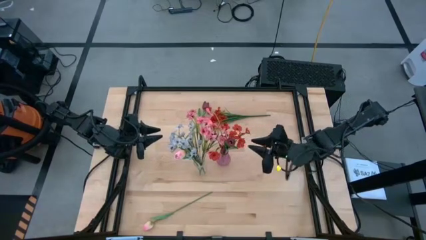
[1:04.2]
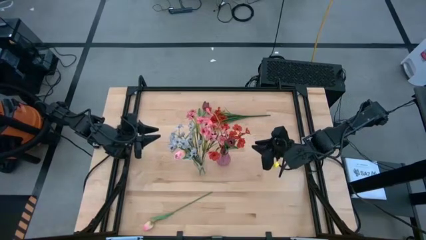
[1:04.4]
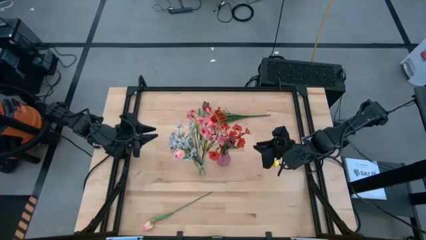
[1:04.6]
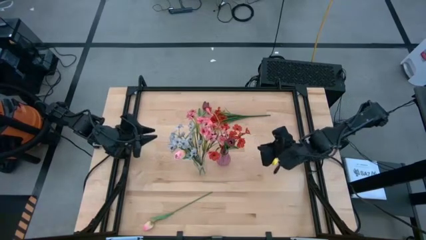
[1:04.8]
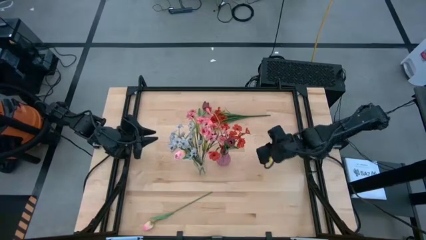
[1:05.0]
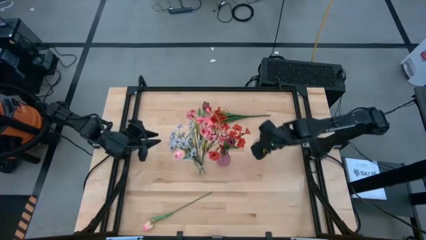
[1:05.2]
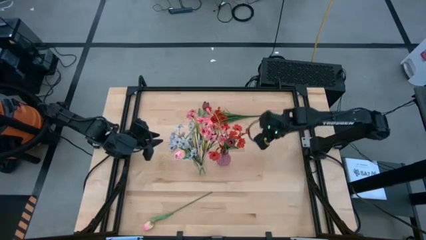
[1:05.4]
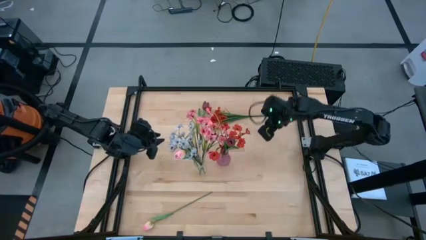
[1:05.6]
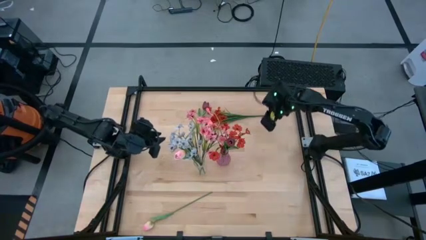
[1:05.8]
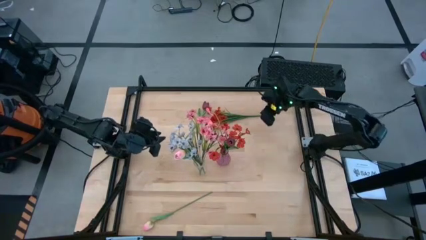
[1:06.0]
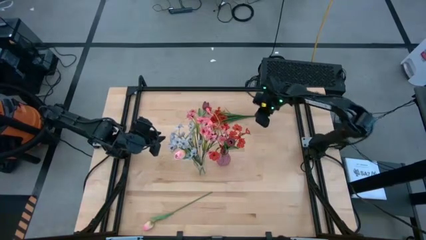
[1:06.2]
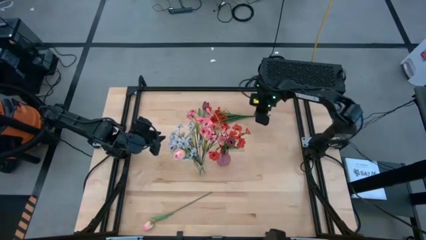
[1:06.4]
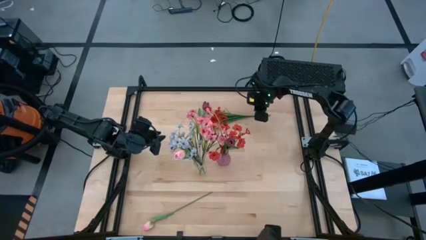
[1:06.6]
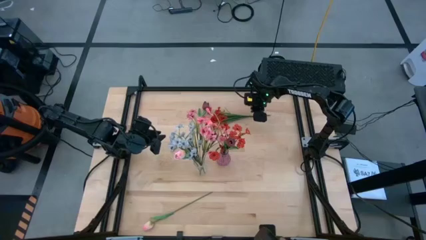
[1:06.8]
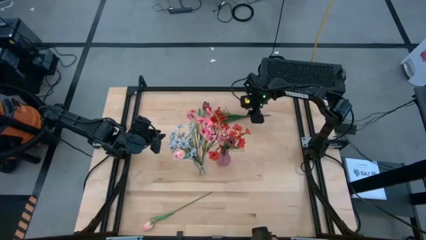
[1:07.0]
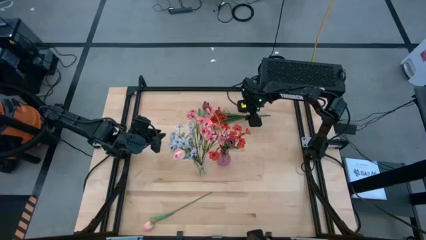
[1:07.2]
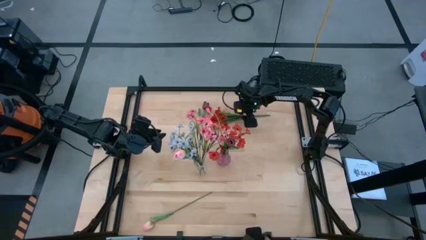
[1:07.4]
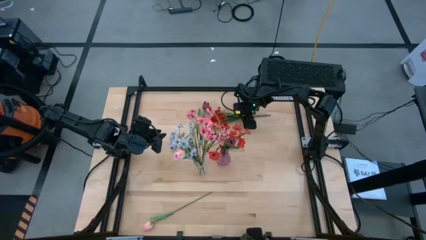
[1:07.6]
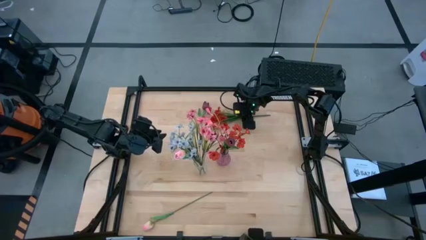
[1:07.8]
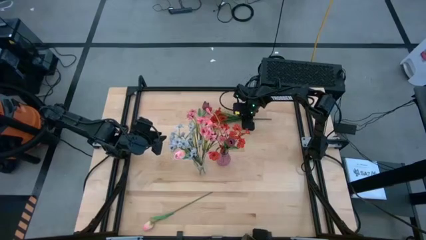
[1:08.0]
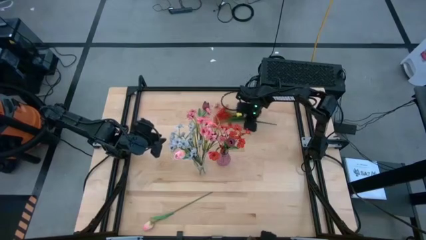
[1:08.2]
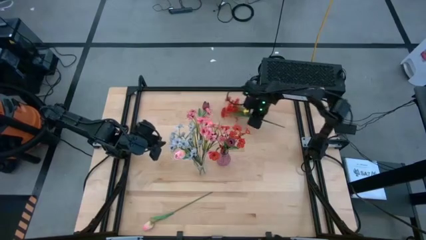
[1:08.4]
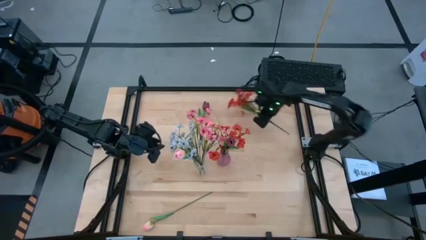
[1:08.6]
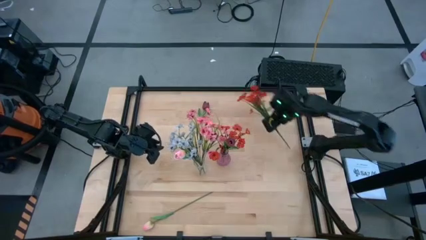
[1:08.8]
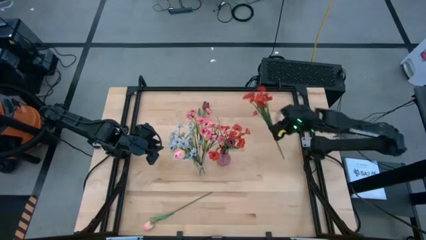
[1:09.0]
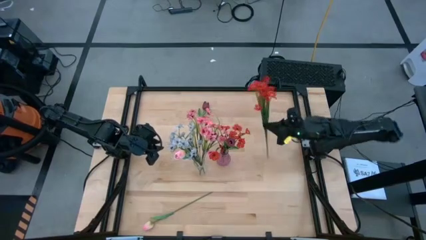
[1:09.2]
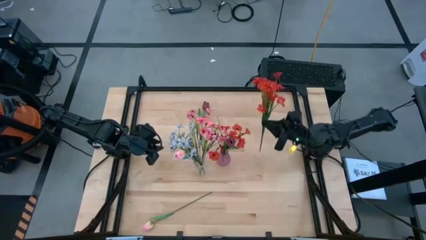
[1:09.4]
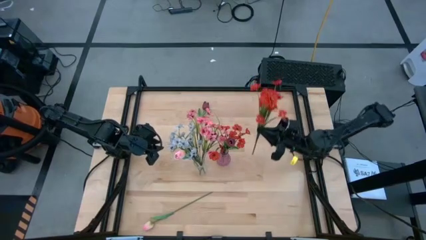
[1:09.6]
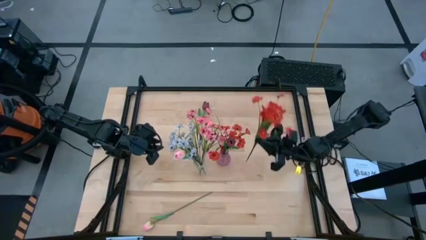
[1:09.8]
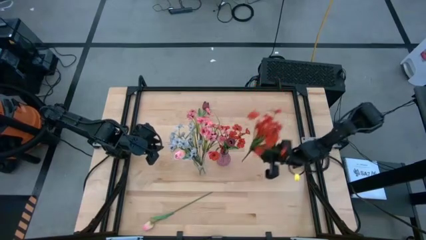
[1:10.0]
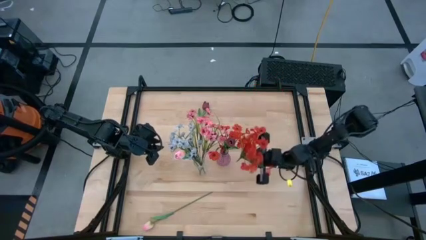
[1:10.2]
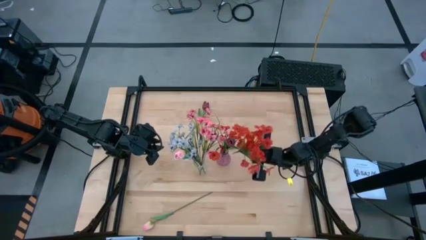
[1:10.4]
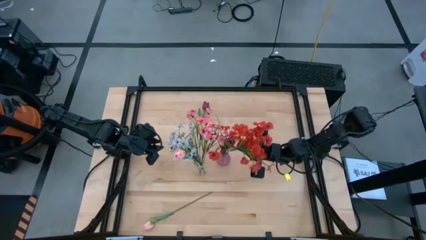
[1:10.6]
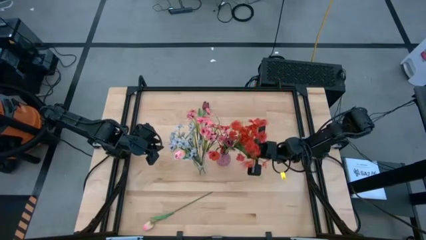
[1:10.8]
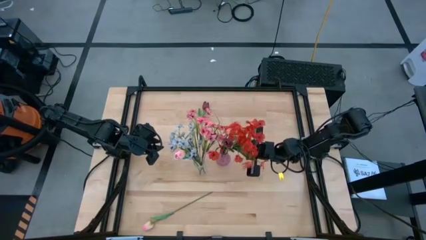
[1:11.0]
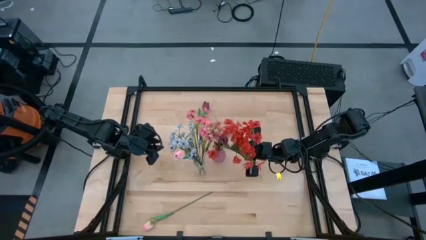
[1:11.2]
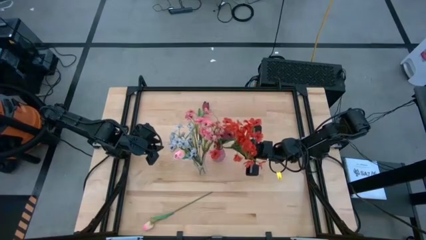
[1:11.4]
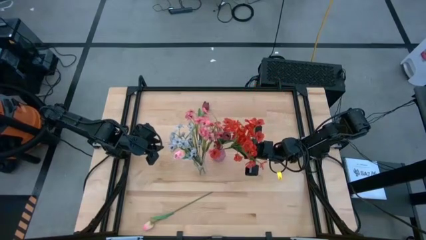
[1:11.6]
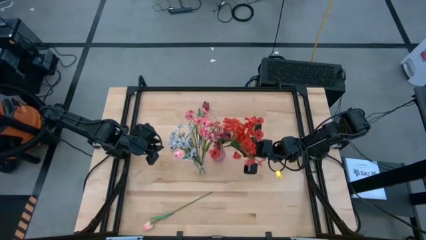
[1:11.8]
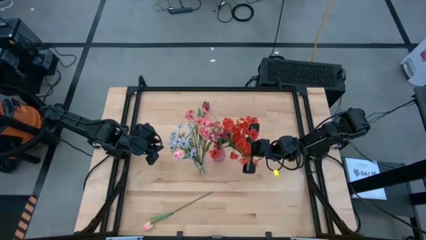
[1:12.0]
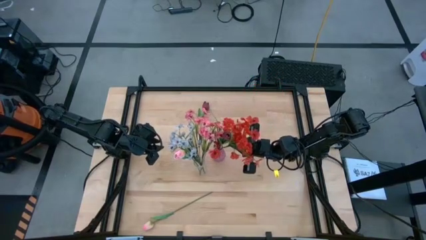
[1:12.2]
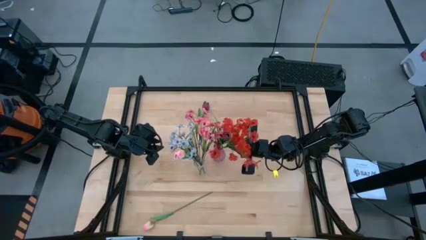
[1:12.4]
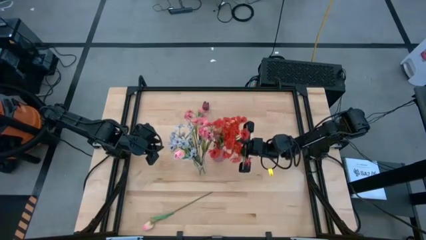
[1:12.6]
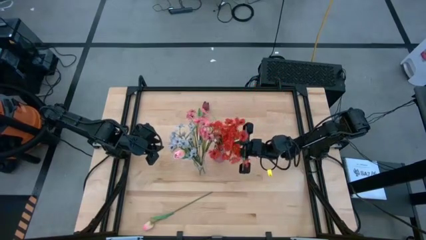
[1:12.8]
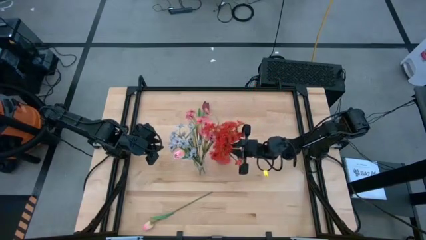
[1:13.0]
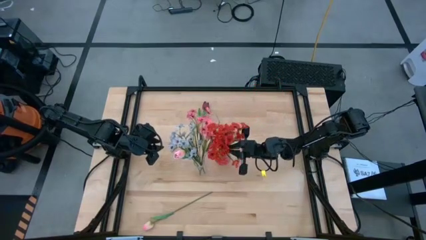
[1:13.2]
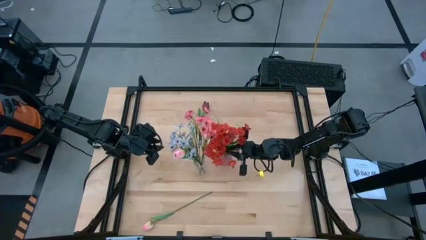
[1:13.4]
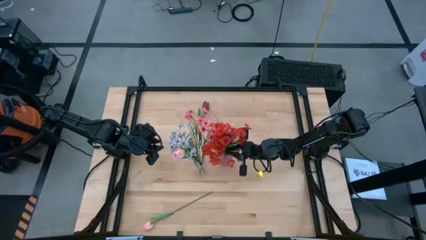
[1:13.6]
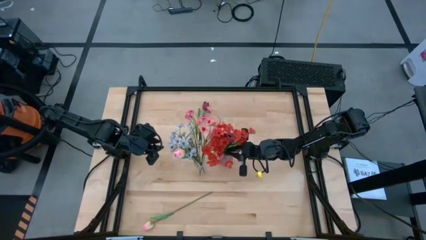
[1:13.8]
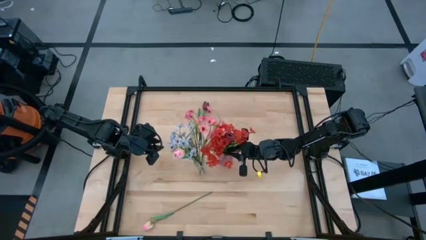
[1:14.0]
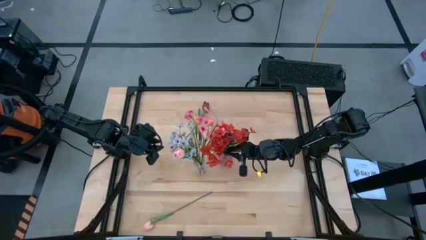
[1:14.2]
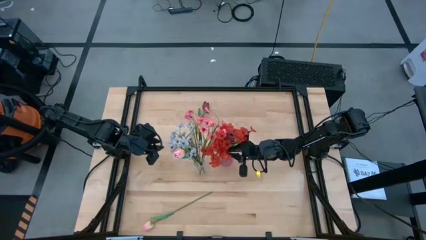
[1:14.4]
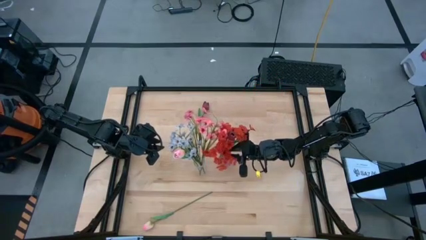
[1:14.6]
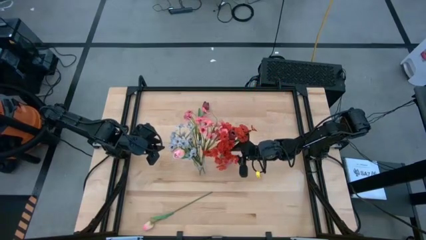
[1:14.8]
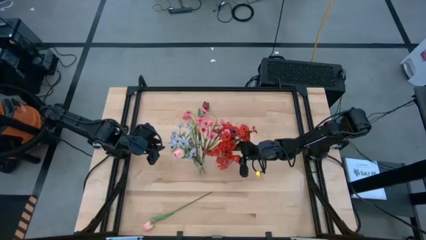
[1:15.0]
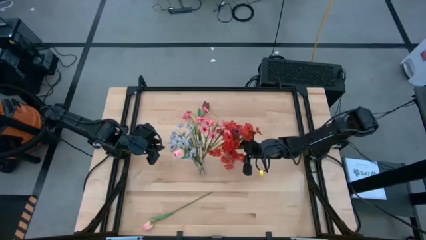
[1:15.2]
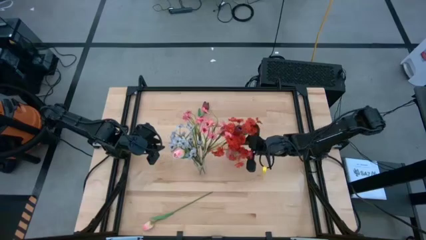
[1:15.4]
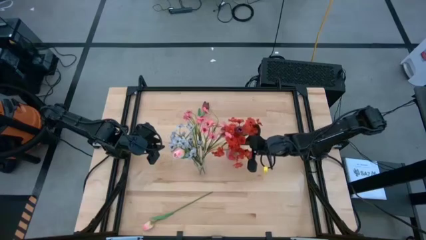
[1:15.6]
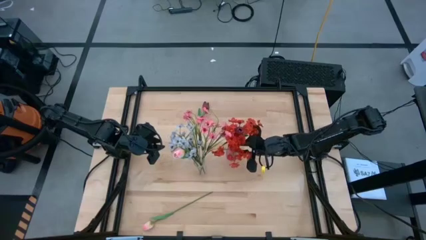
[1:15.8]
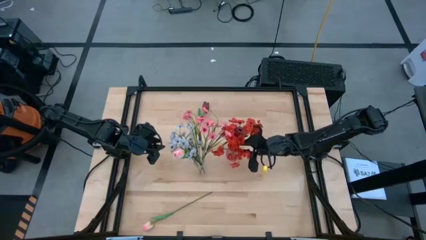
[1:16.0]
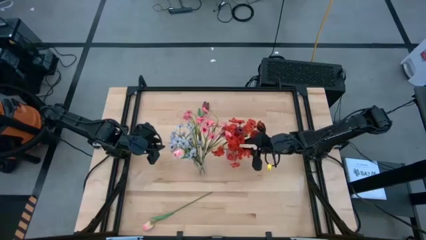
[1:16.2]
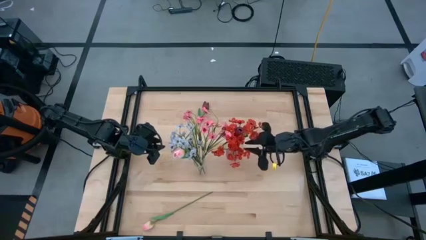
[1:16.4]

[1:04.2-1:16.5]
Task: Sort flowers into vase by color
Put the red flowers into the purple vase
